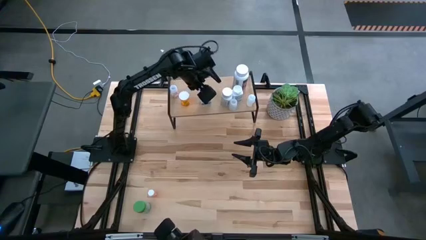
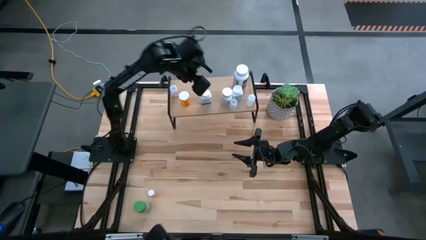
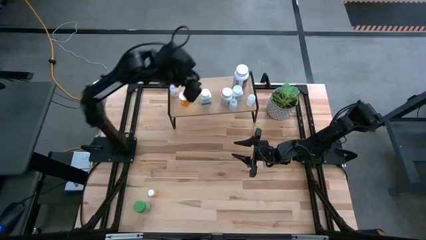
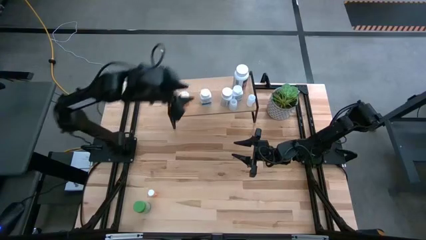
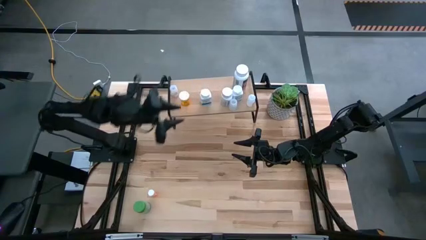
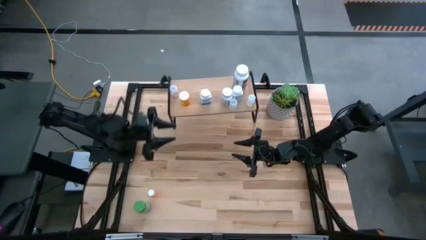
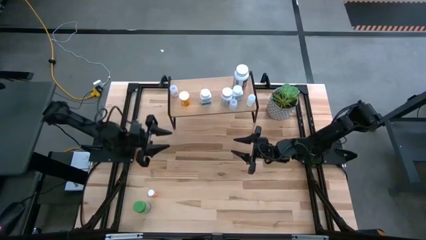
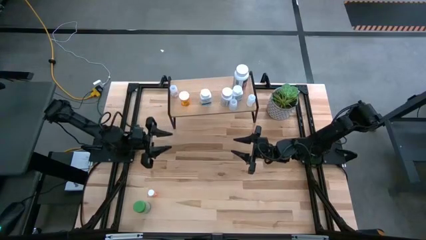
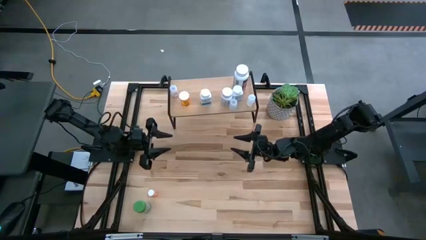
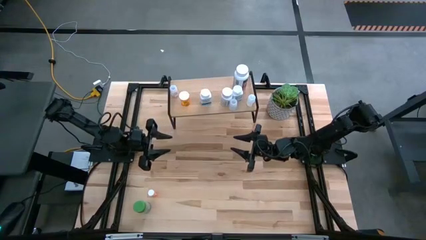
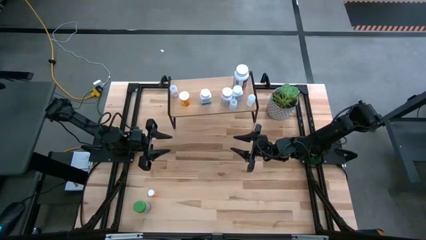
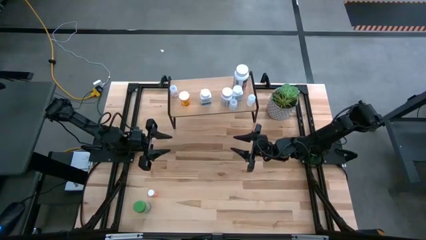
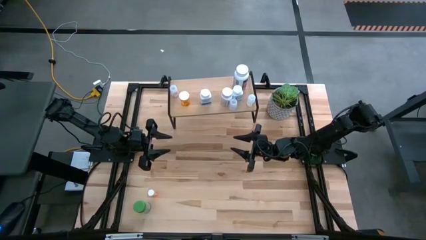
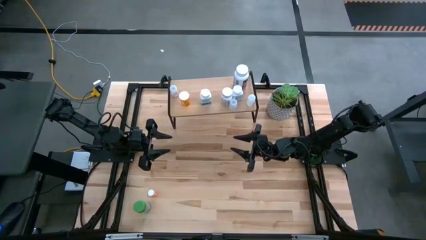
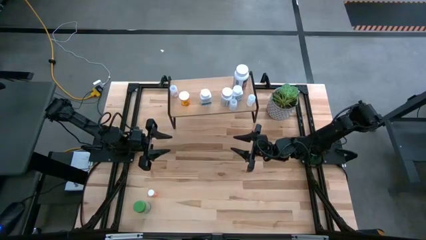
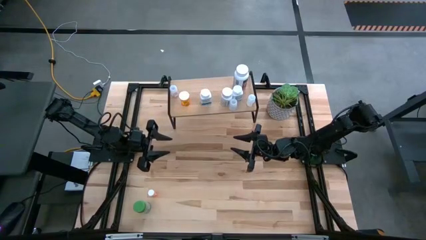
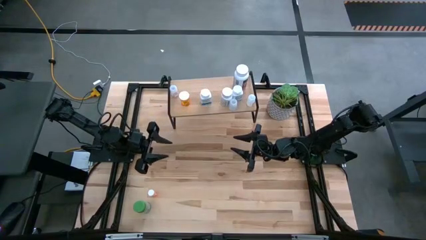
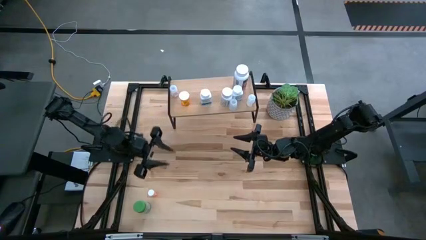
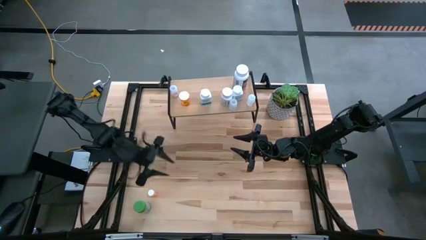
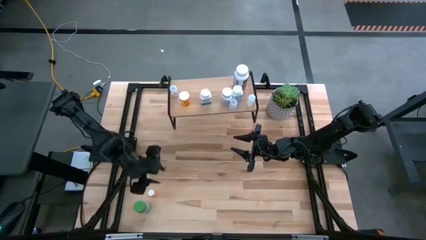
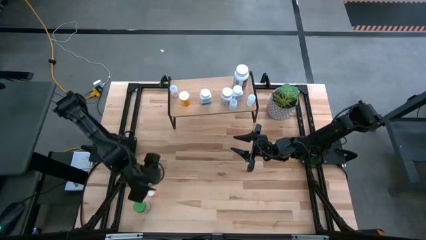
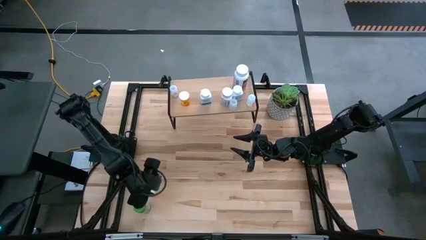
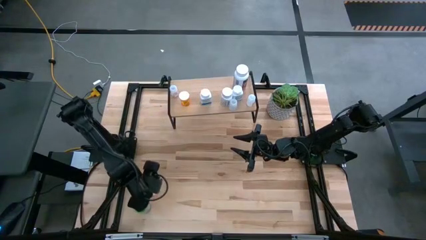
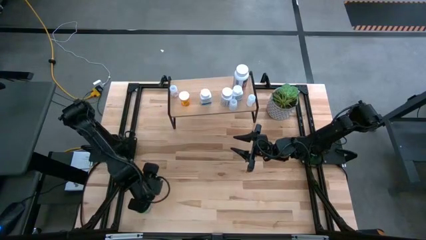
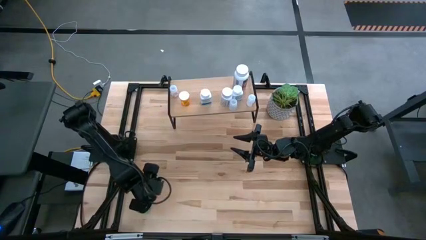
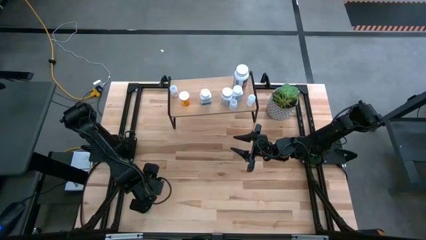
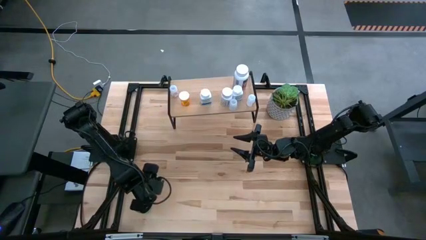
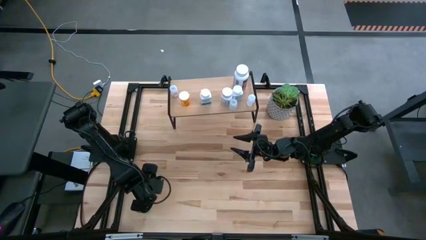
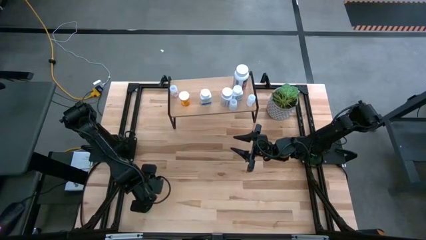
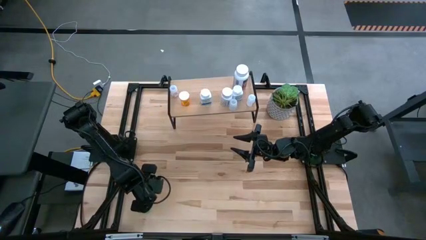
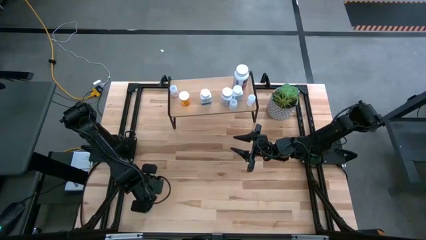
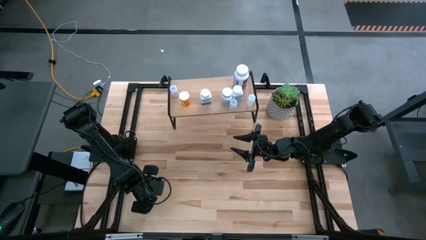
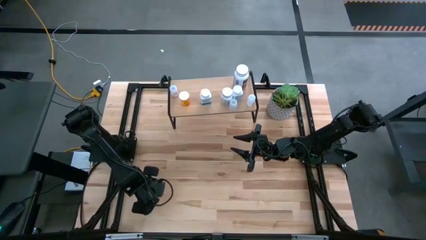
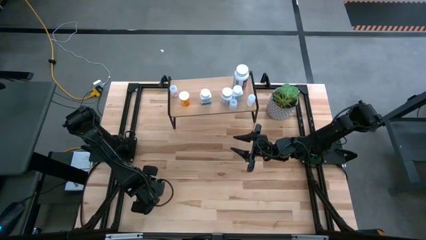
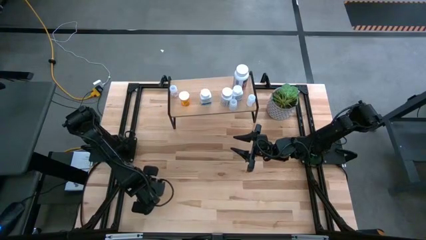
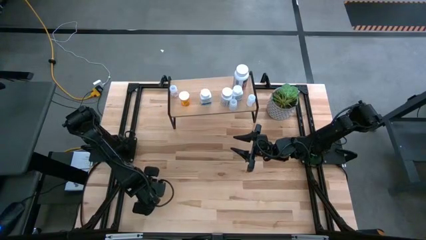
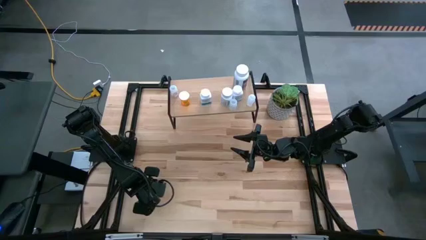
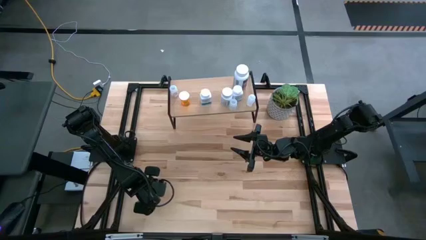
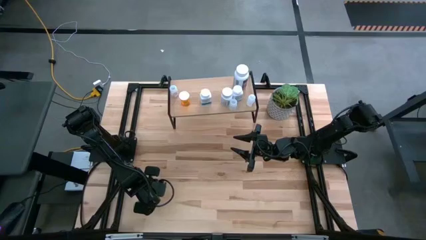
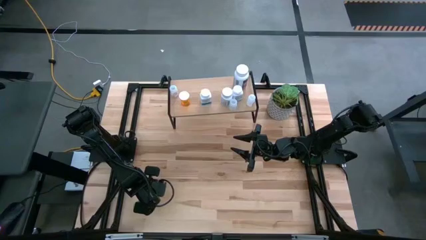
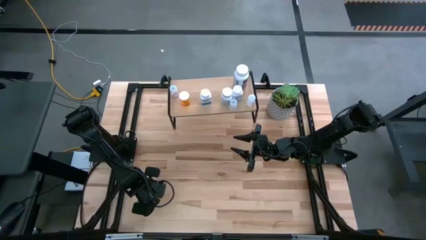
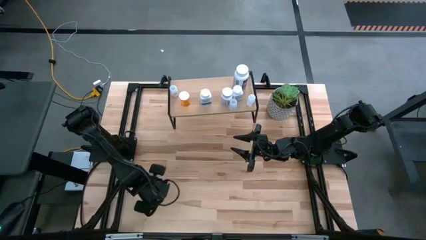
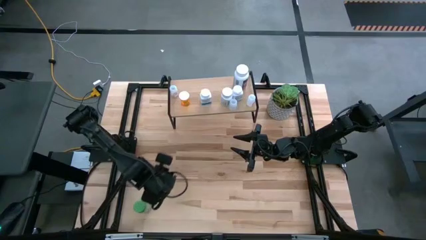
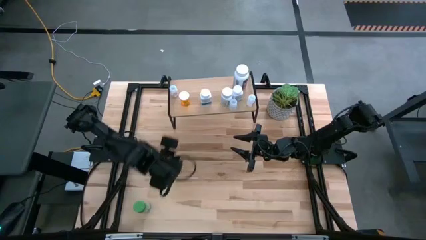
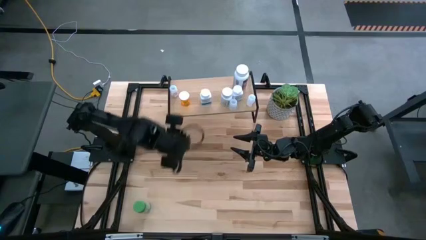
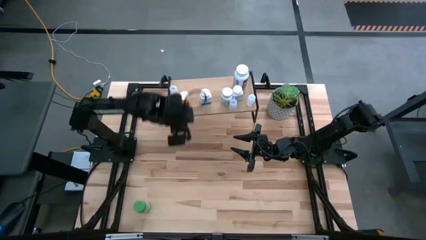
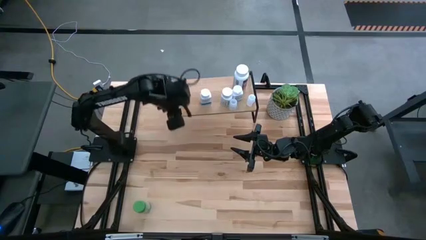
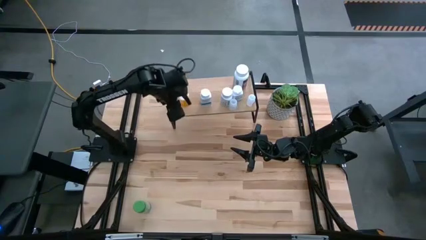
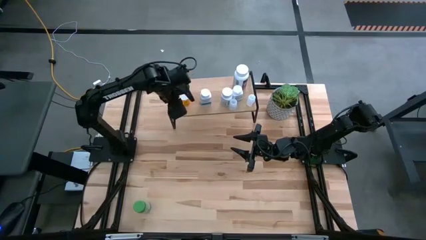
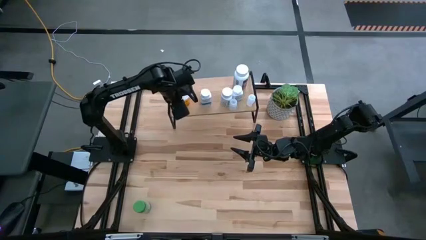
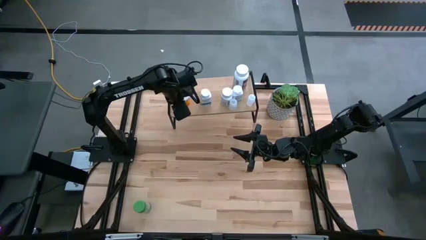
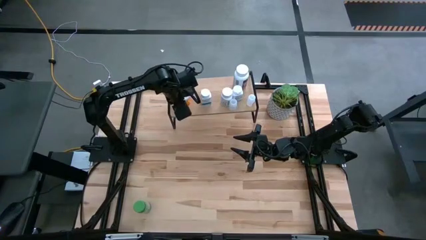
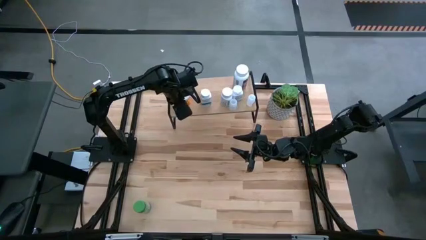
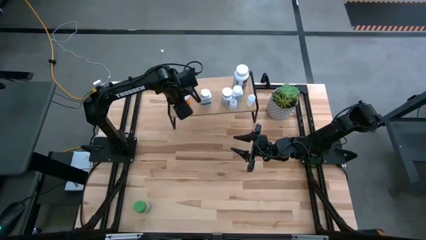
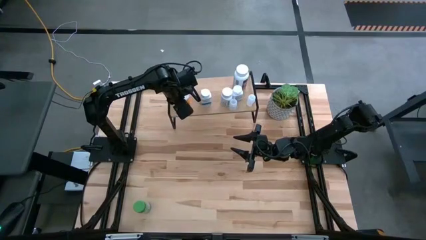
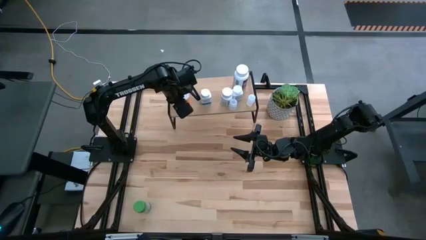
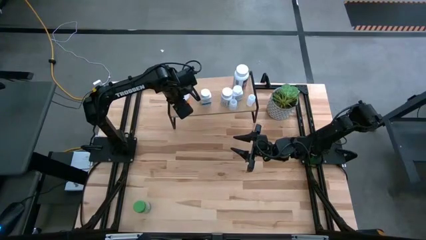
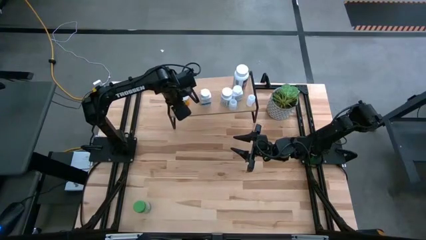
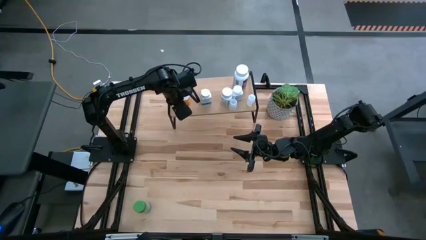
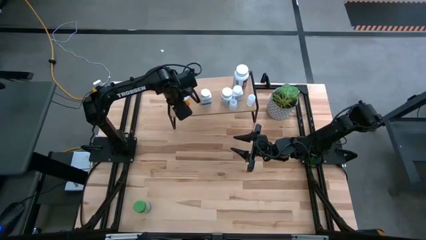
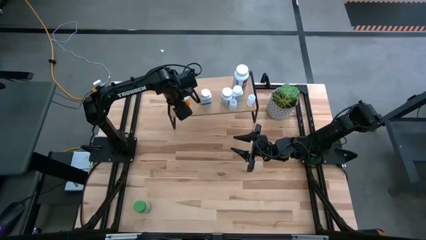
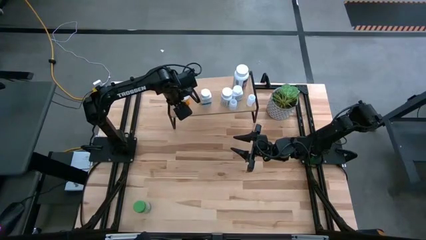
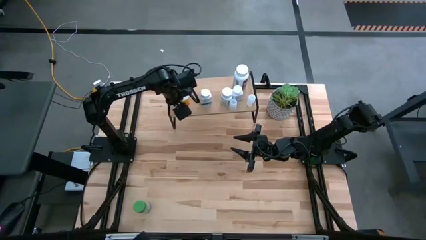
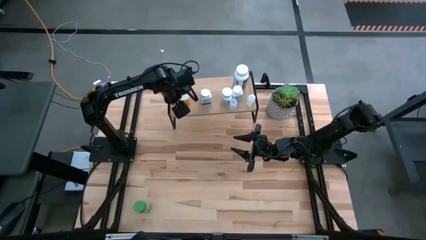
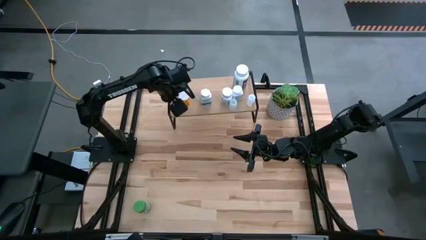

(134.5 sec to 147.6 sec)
Task: Pick and place medicine bottles onto shelf by color
Put the red pill bottle on the shelf
